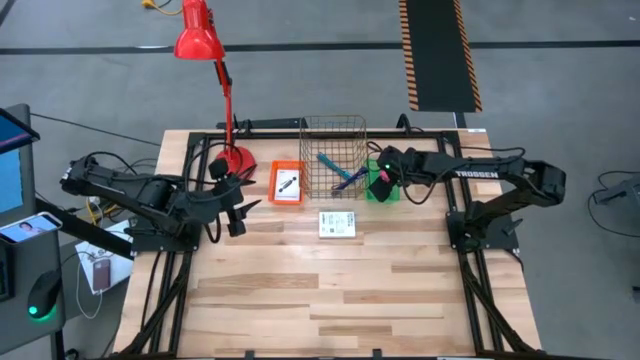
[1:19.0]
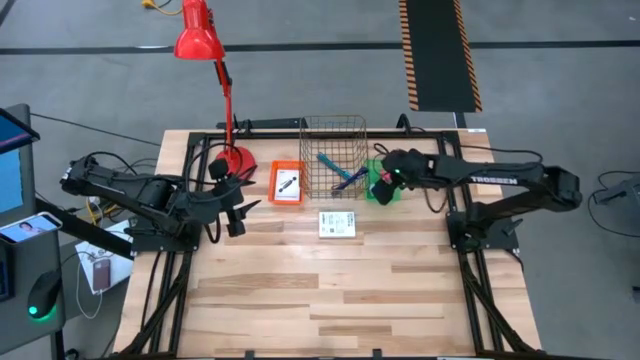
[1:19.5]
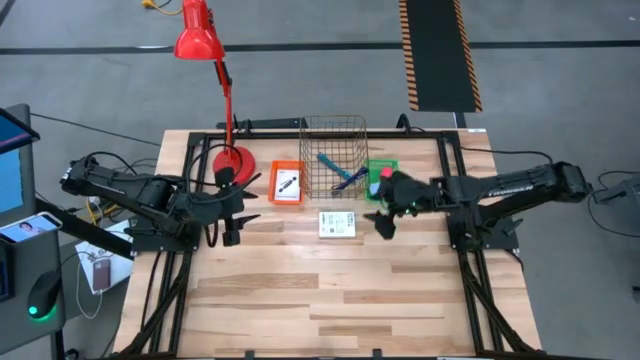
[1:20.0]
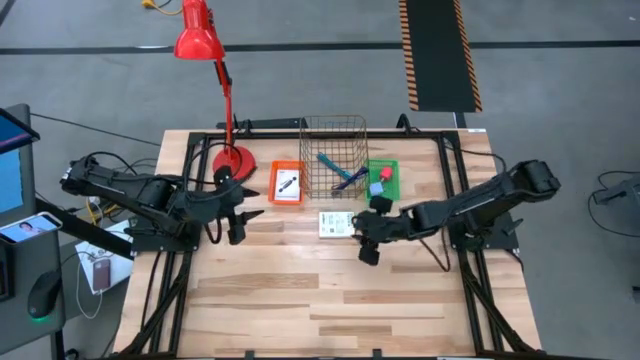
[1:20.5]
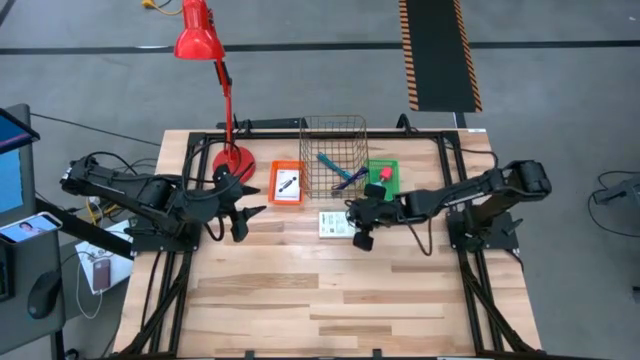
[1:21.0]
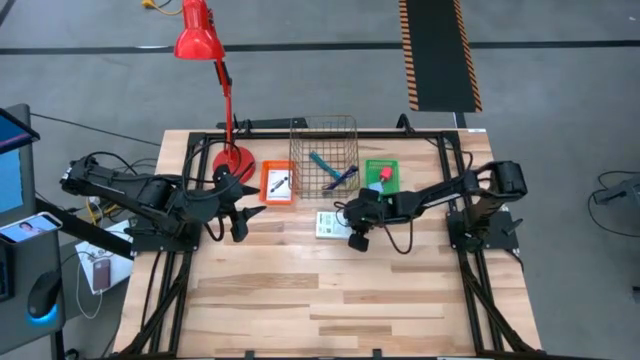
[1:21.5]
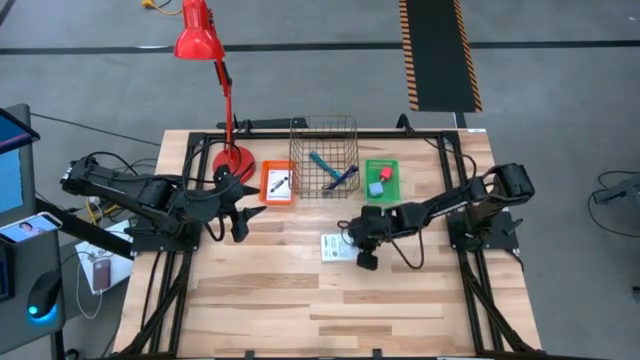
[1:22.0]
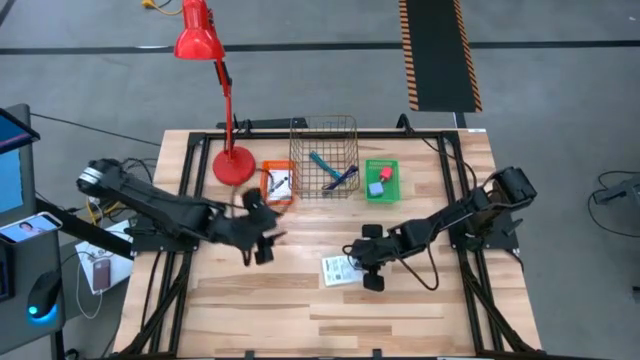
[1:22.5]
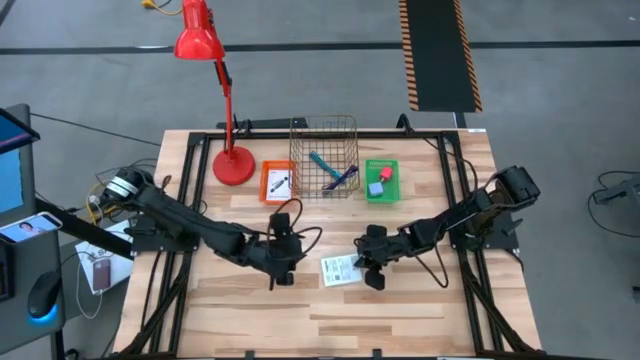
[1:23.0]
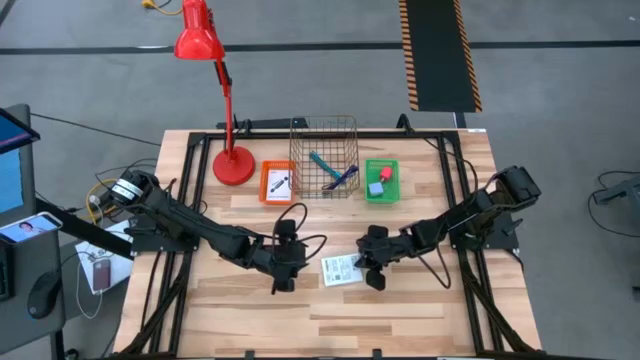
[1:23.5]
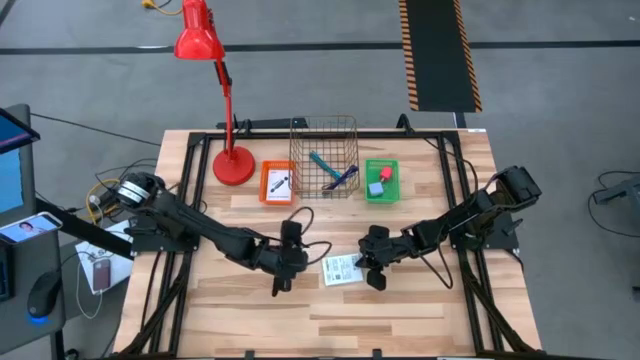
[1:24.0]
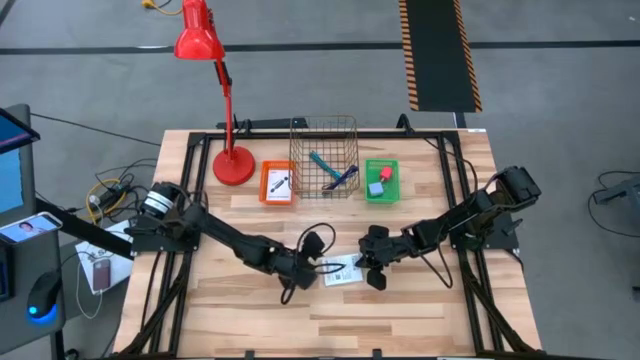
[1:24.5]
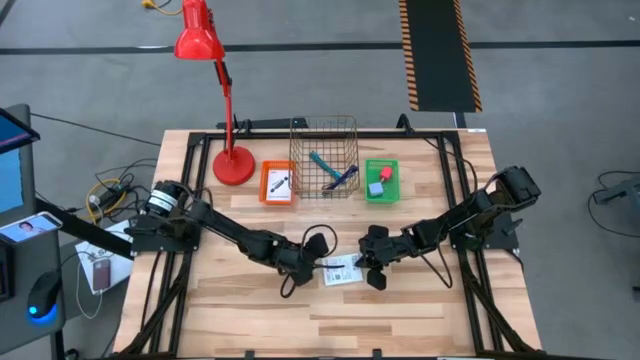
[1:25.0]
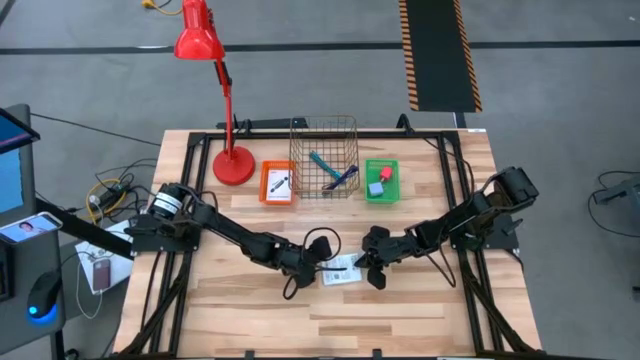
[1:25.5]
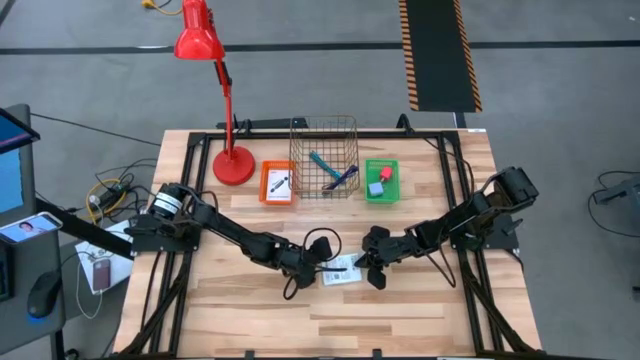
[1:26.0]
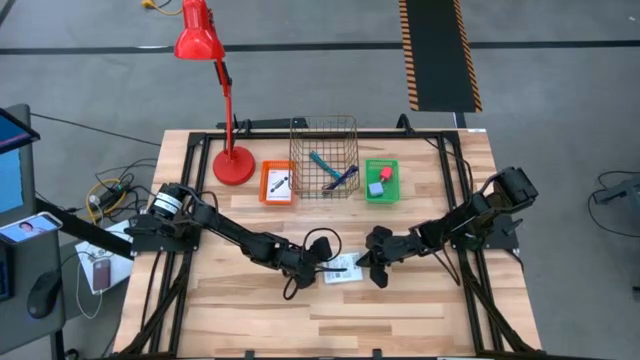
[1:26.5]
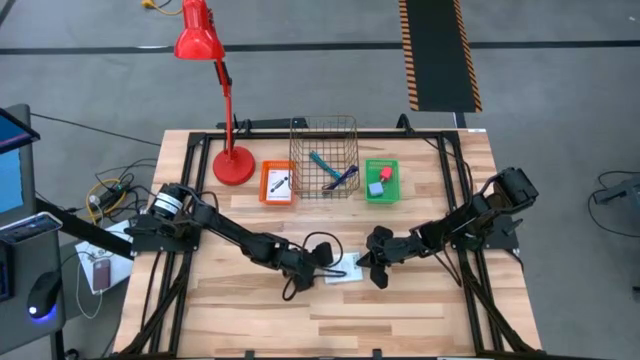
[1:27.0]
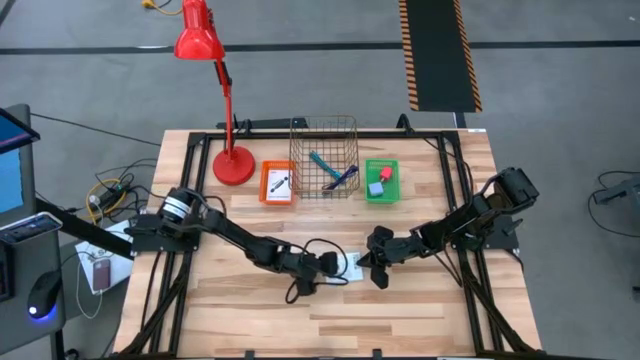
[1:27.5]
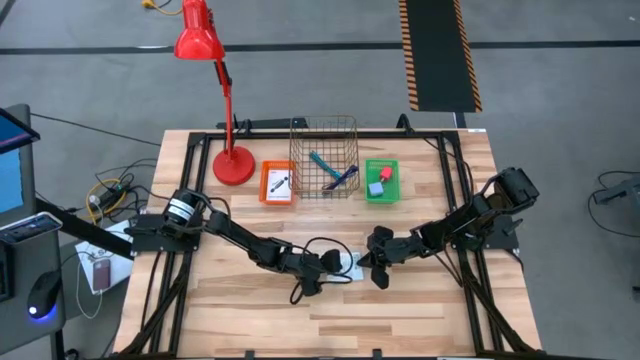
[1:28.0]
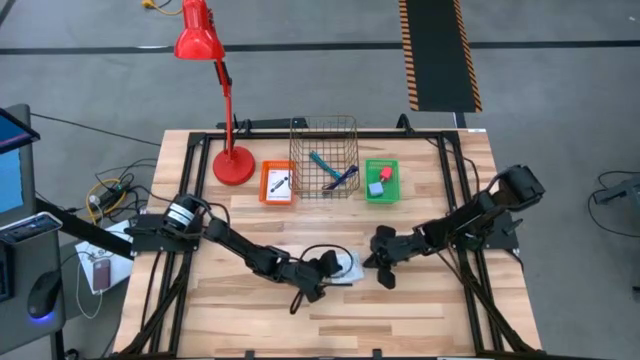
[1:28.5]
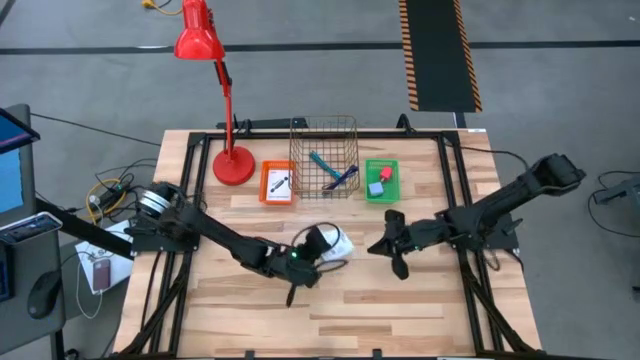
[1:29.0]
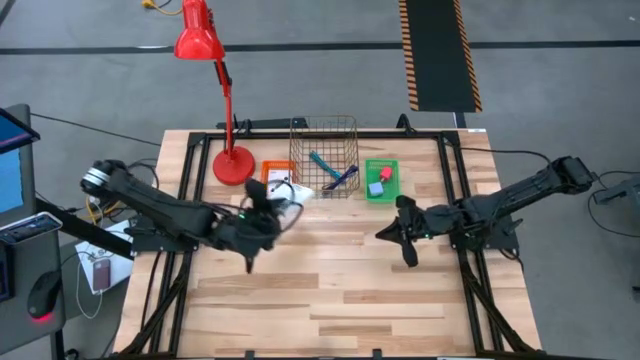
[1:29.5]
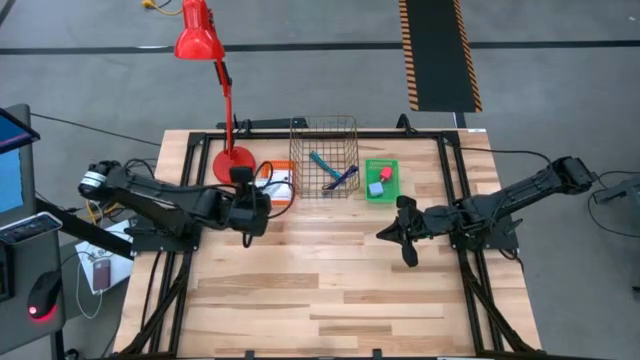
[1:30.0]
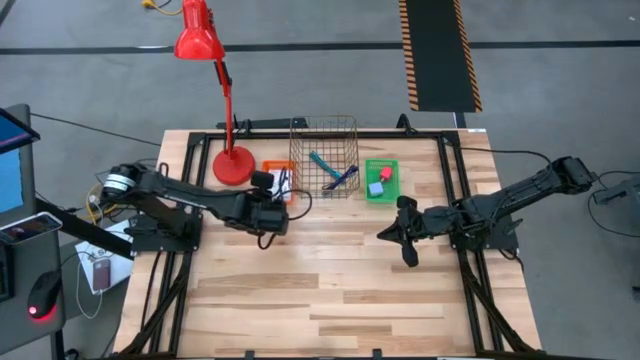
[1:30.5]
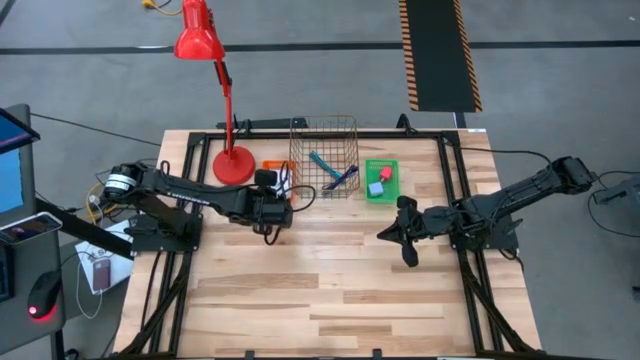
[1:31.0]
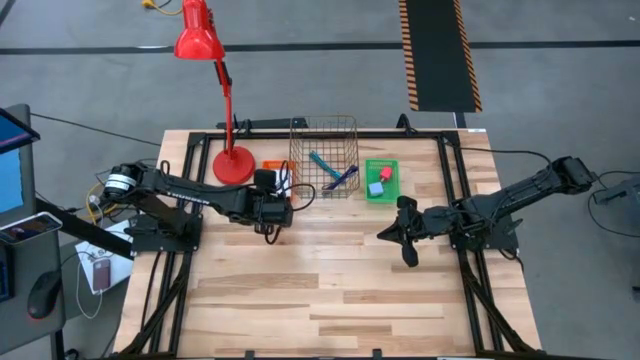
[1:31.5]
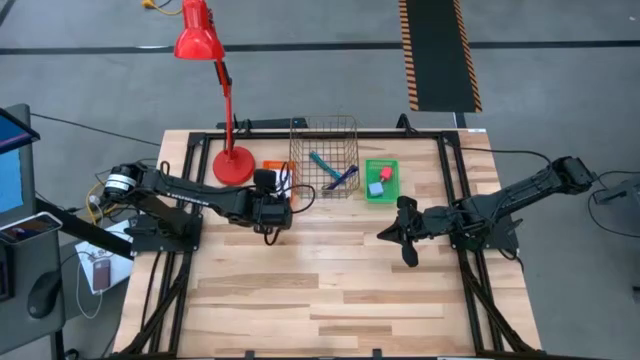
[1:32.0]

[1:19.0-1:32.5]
Task: Pick and place items into bin
Put the card reader box into the orange basket

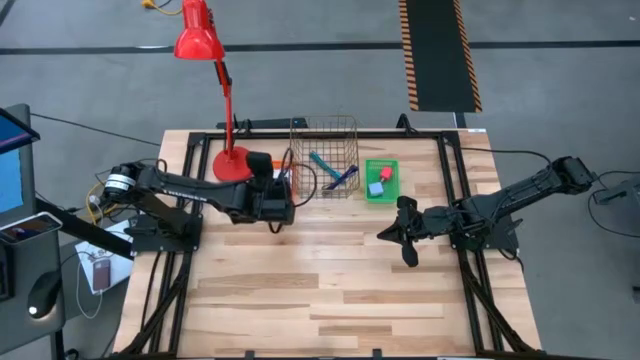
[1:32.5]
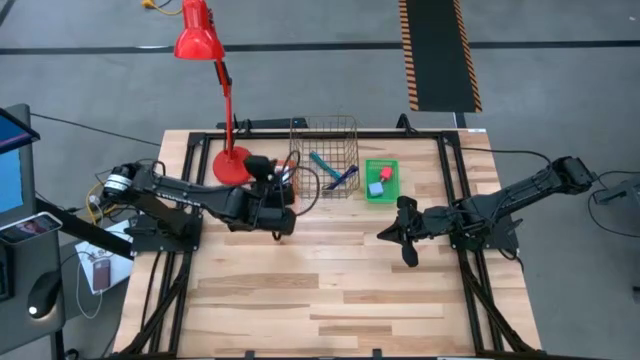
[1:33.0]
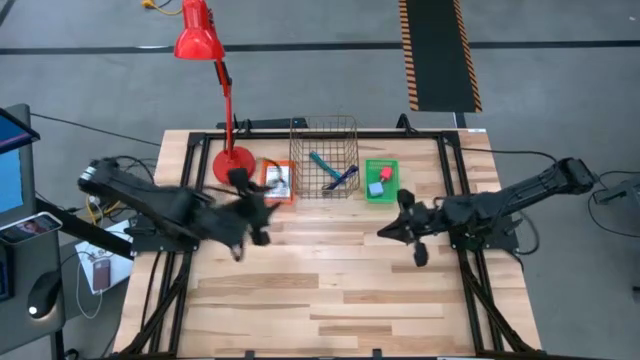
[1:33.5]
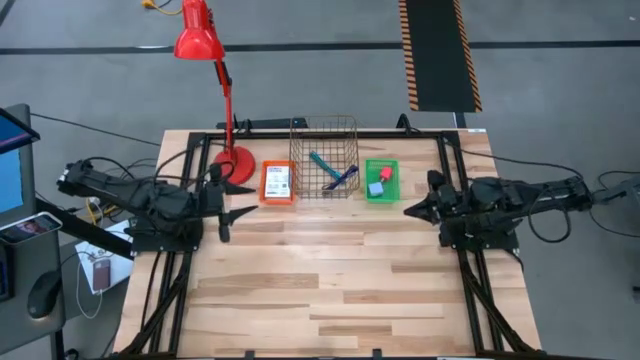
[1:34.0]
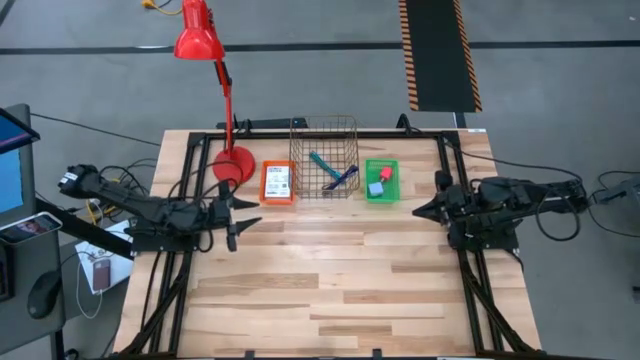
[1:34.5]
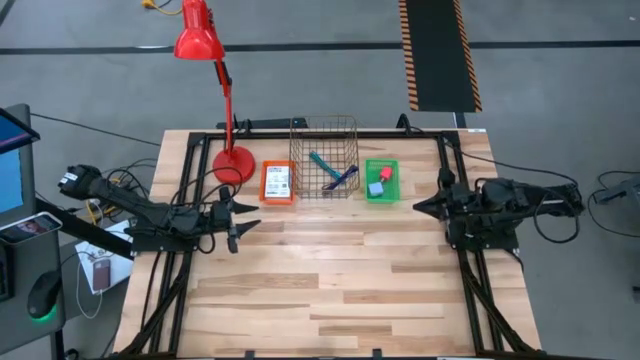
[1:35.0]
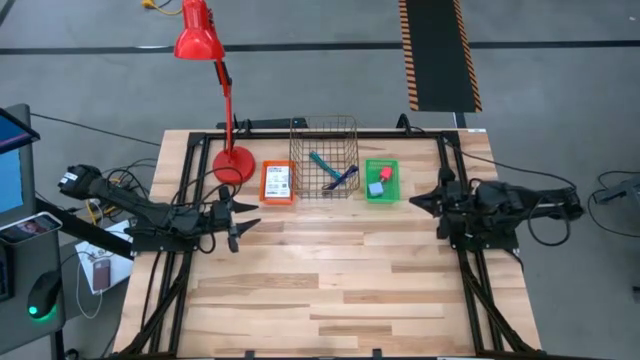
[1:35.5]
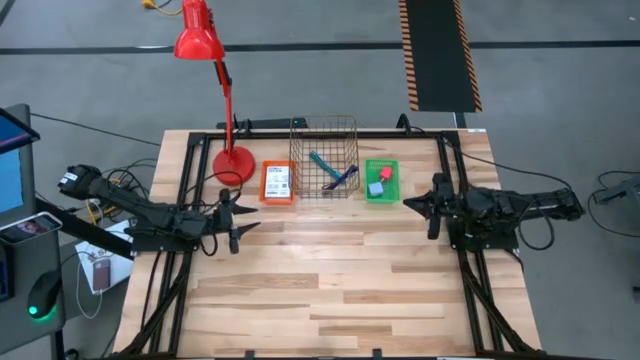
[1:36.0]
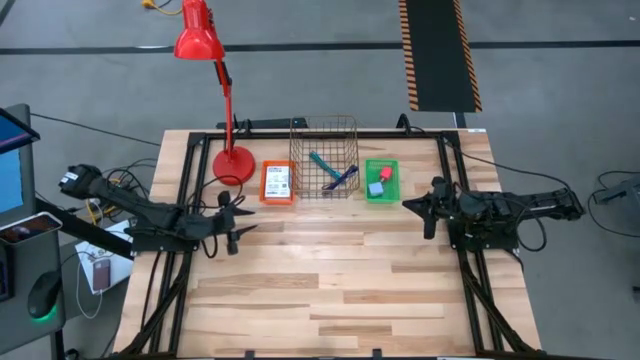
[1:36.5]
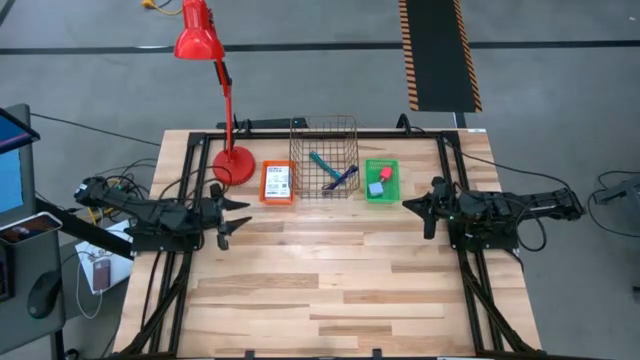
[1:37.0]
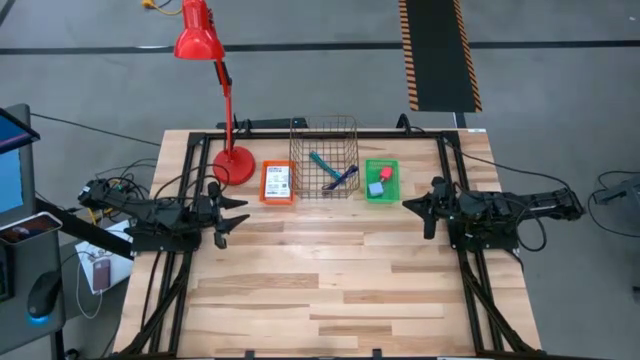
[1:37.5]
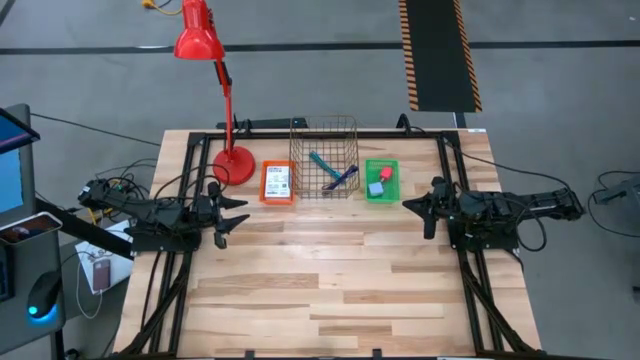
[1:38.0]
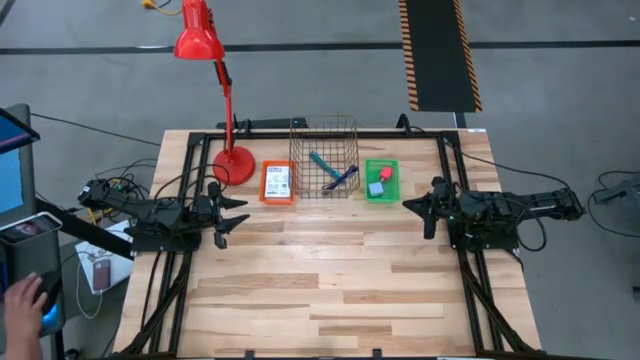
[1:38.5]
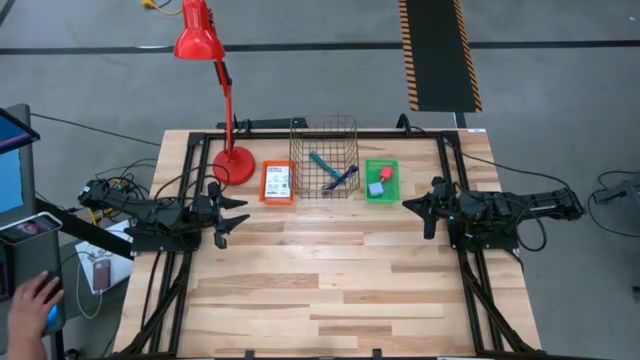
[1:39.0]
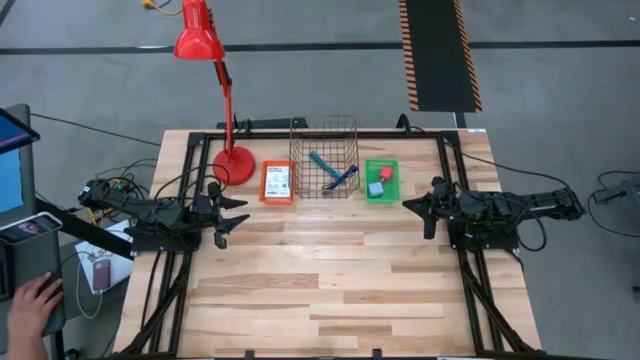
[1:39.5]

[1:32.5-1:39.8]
Return to Home Position

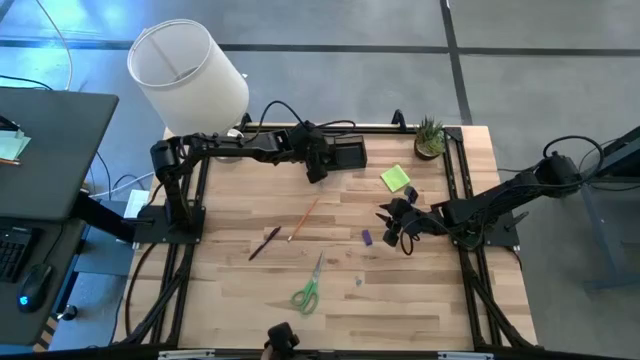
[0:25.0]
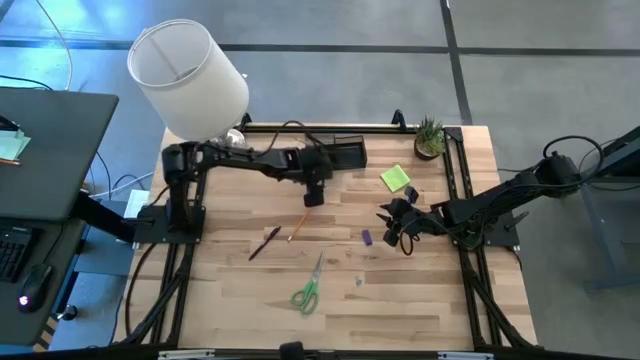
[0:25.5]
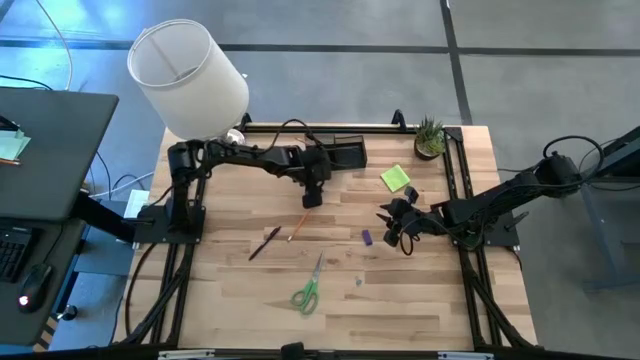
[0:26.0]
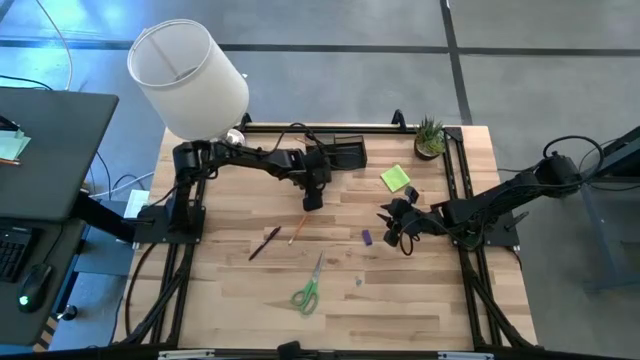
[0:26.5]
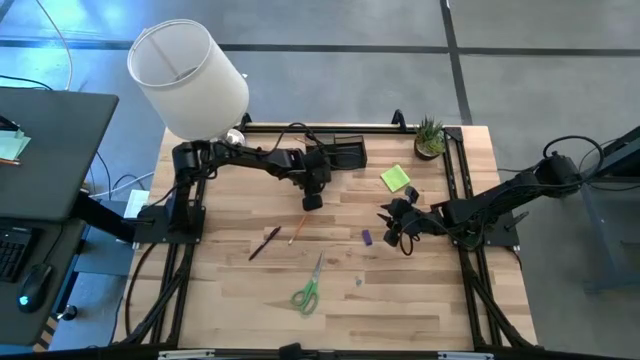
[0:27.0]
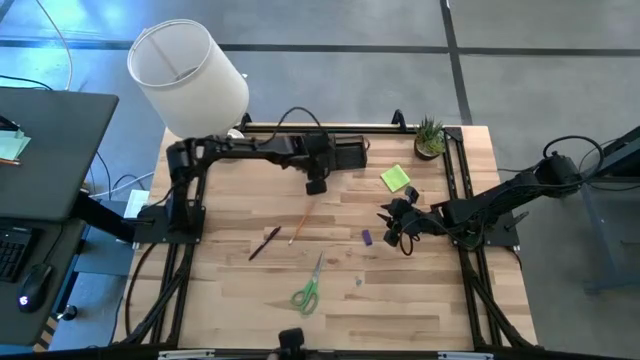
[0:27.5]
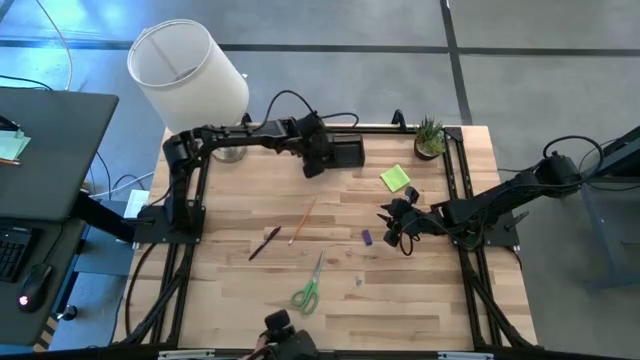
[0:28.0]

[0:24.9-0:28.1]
Task: Pick and place office supplies into organizer
Put the top blue binder clip into the black desk organizer
